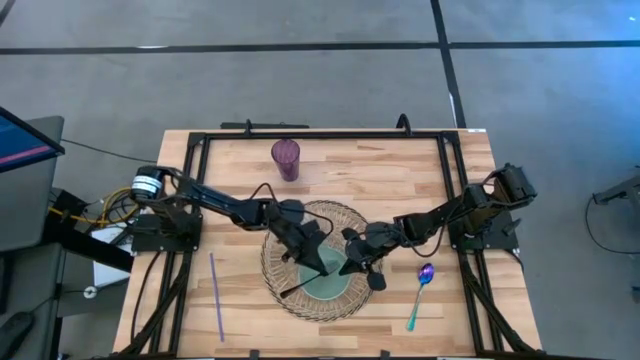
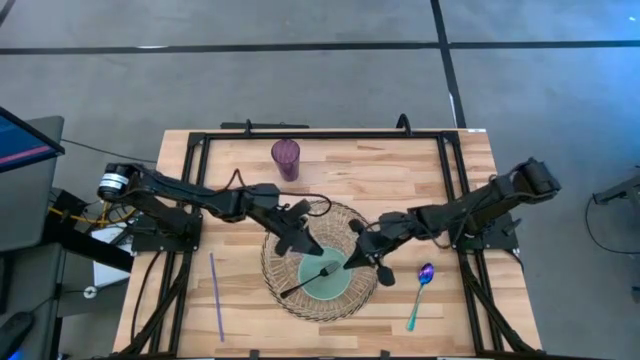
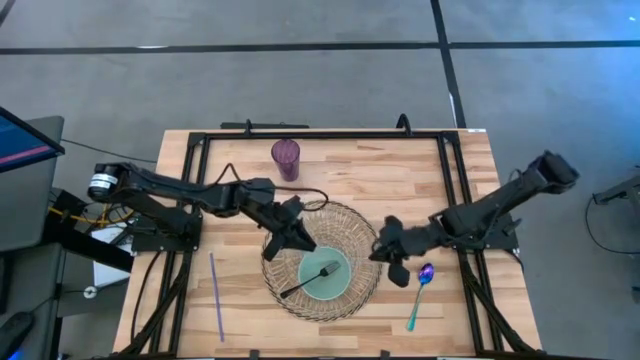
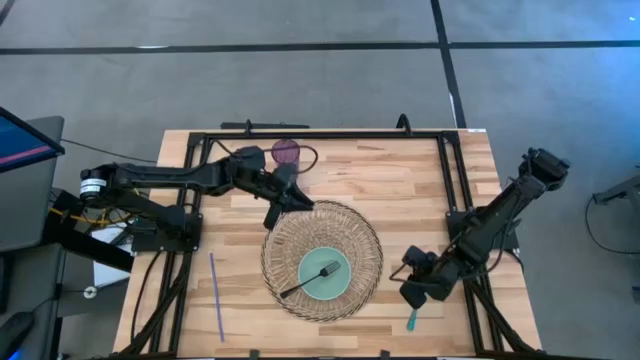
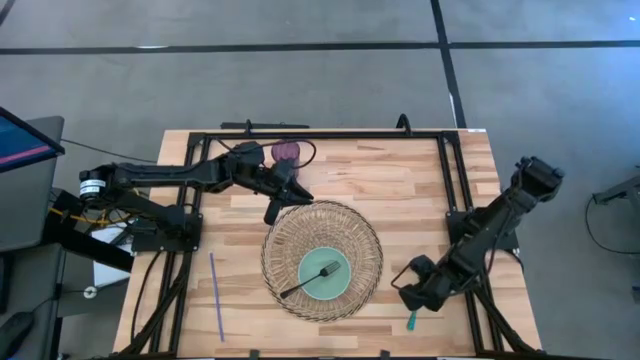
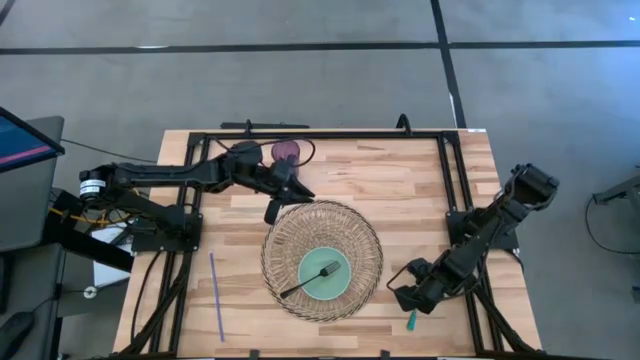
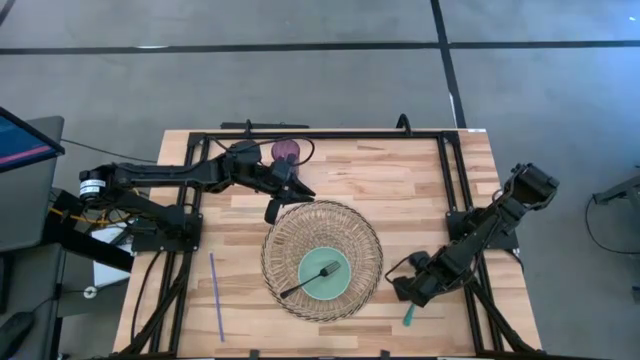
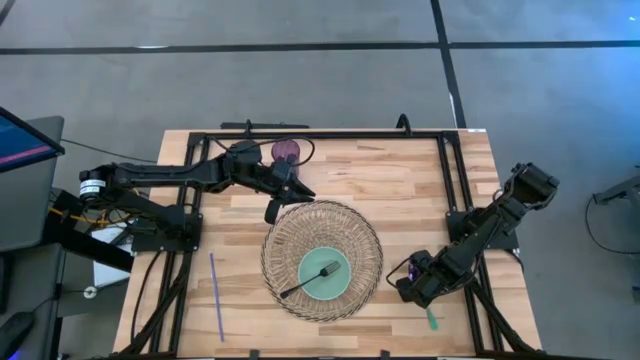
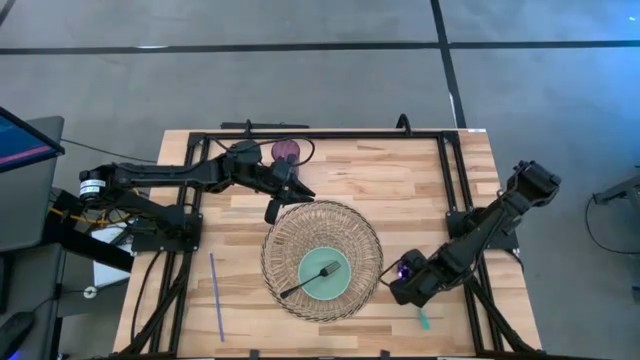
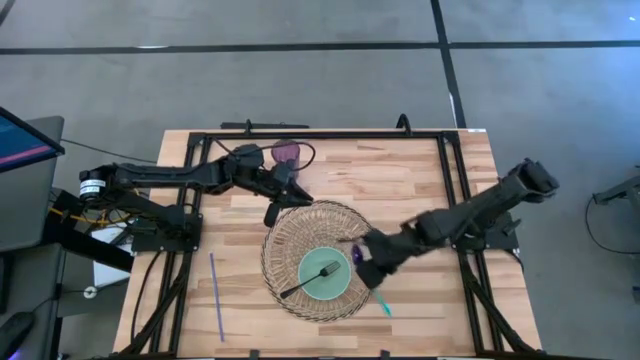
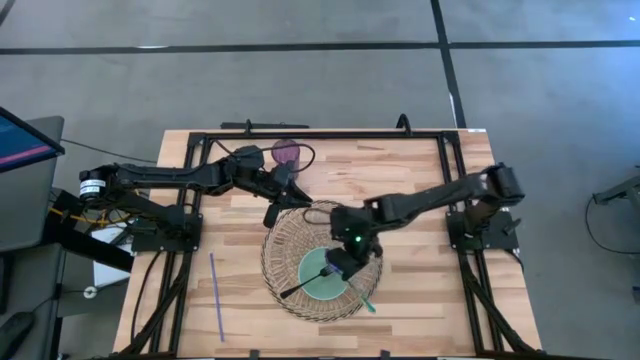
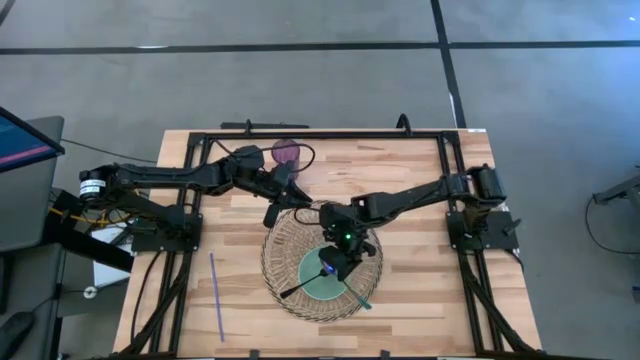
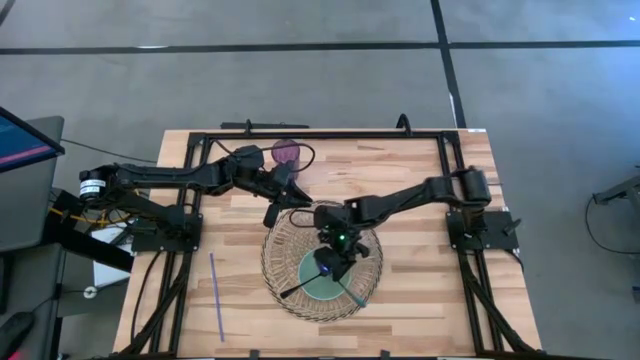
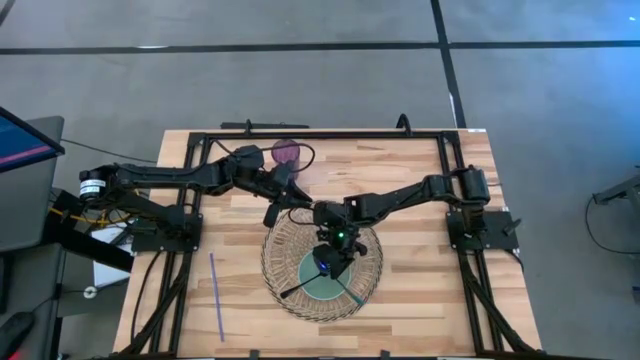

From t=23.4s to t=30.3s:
Task: Pick & Place Utensil
Put the purple spoon into the light green bowl on the woven mat

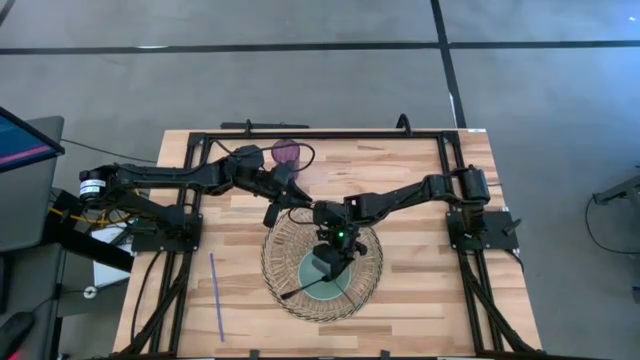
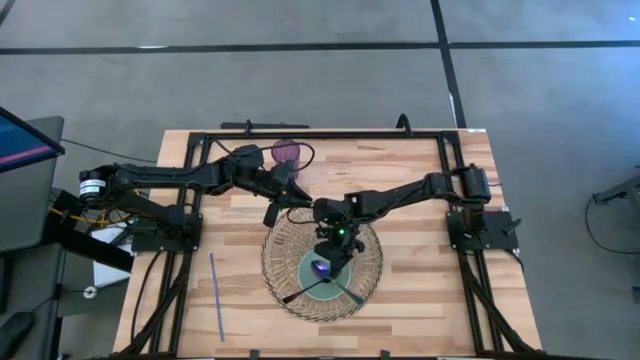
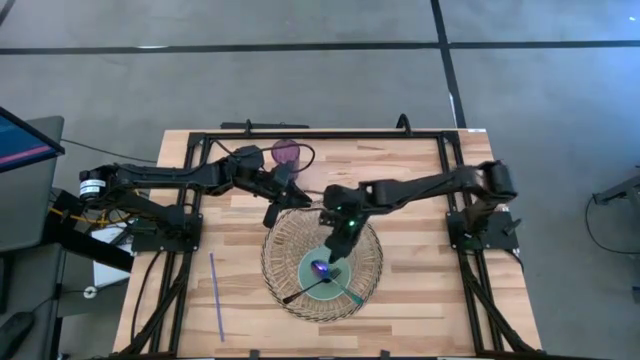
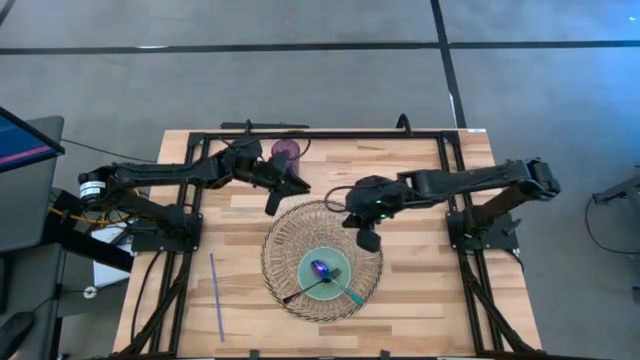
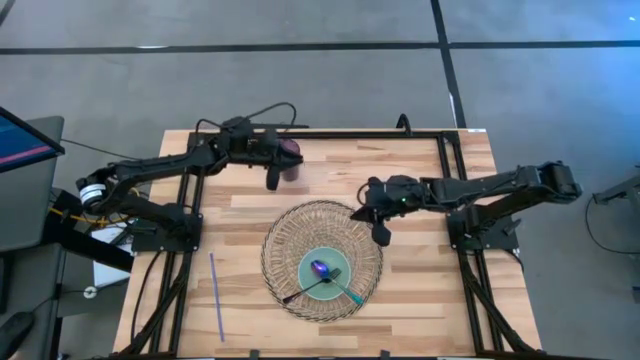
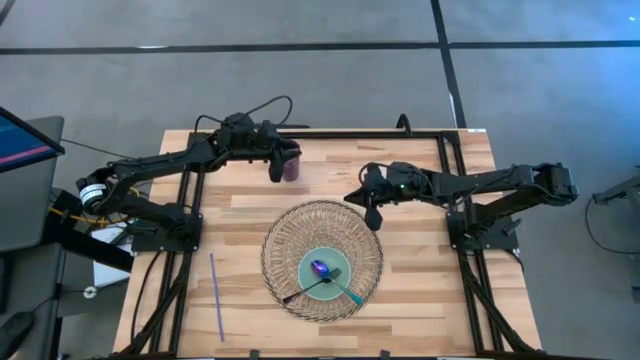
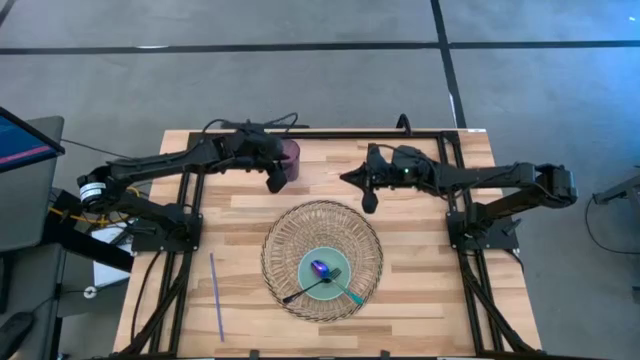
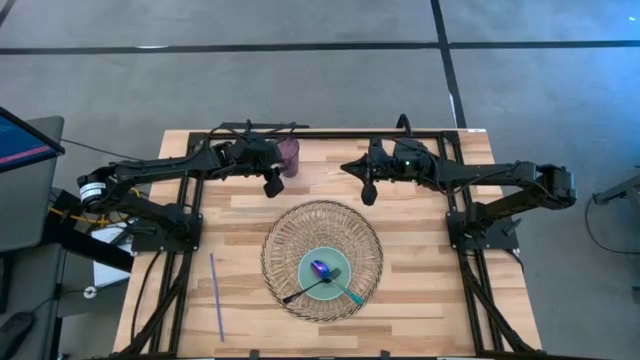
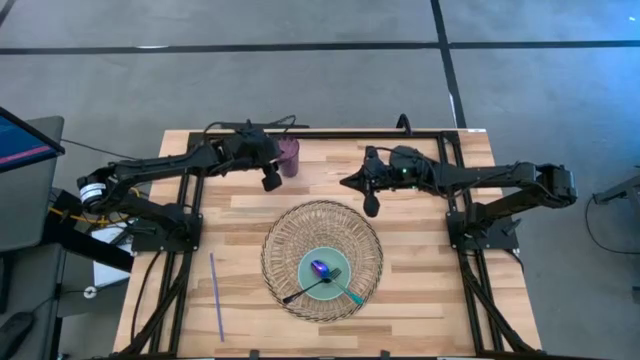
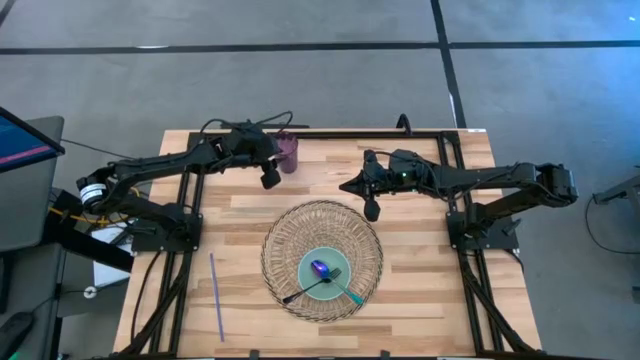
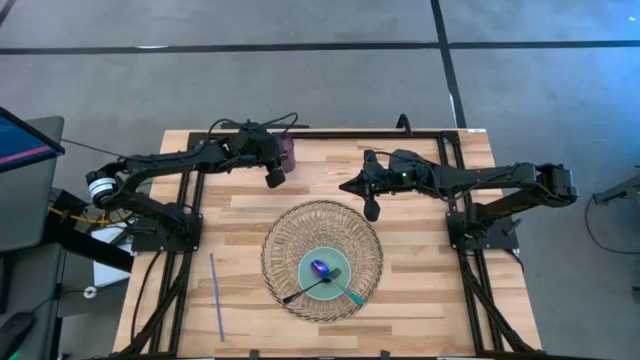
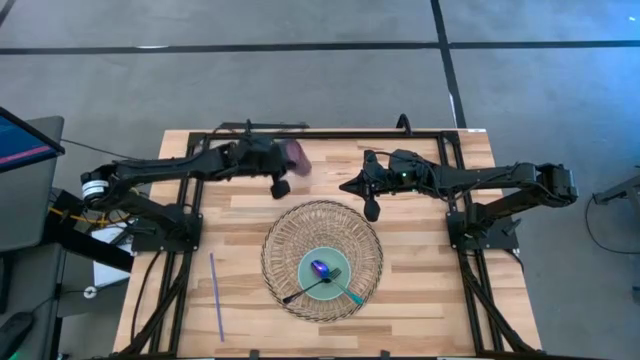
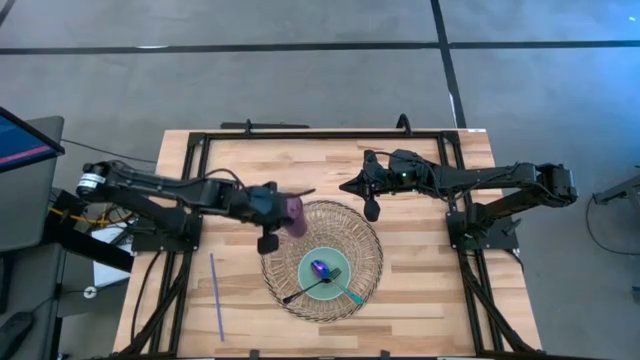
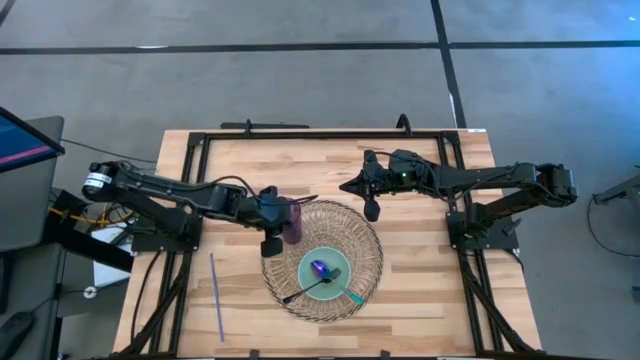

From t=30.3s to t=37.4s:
Put the violet glass on the woven mat to the top left of the light green bowl

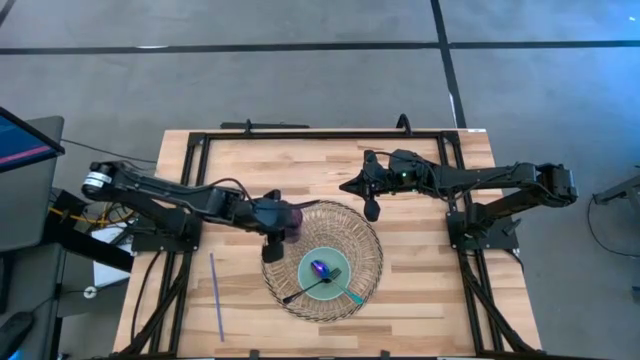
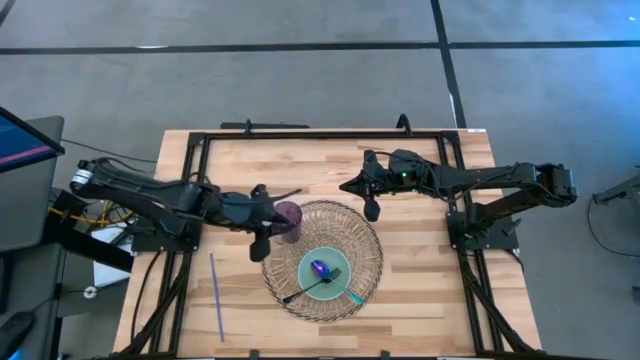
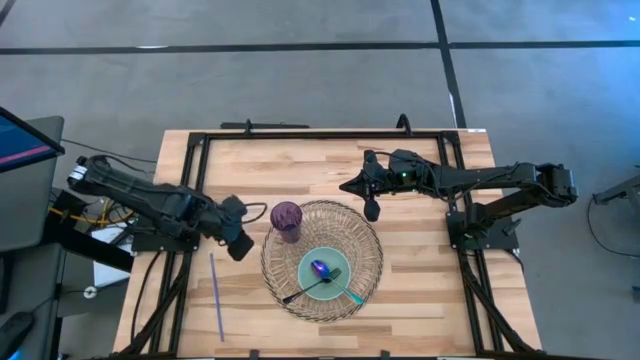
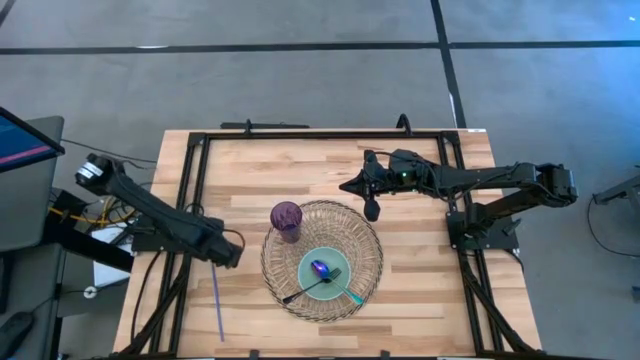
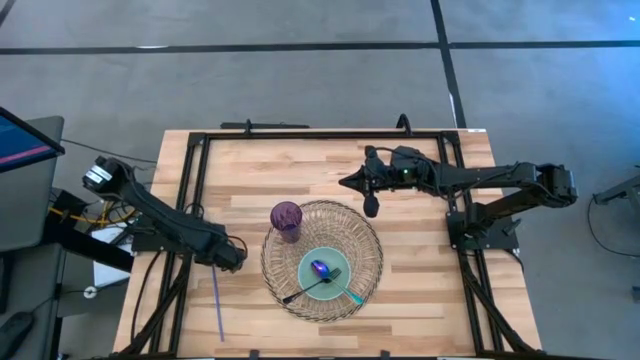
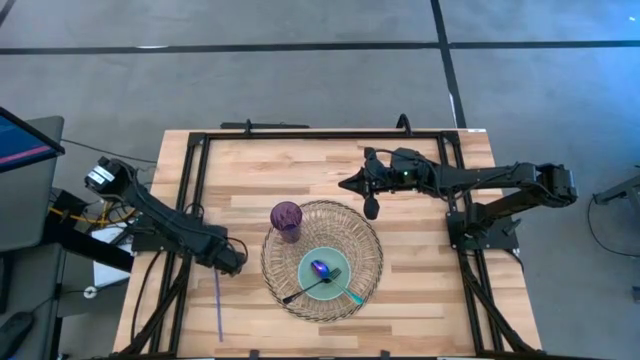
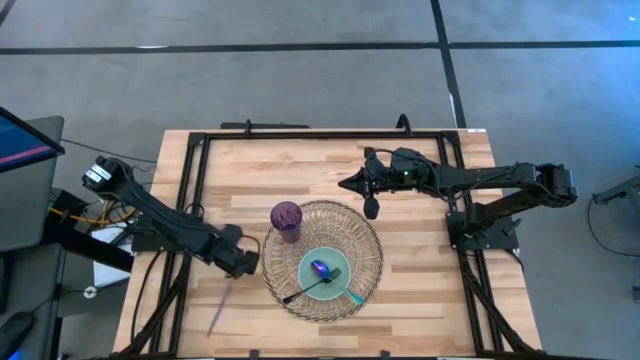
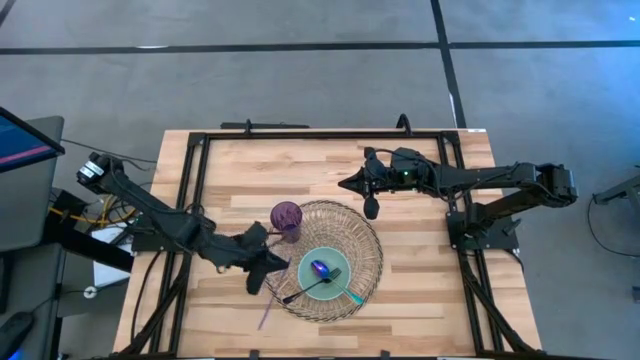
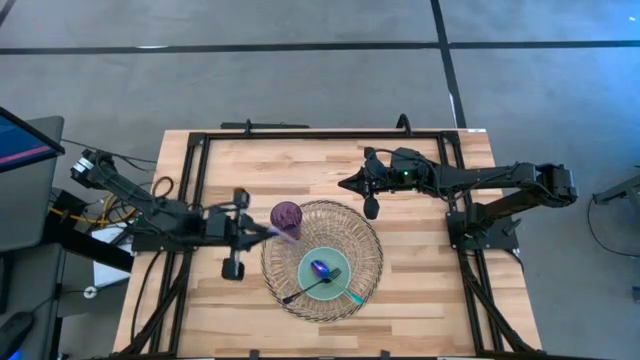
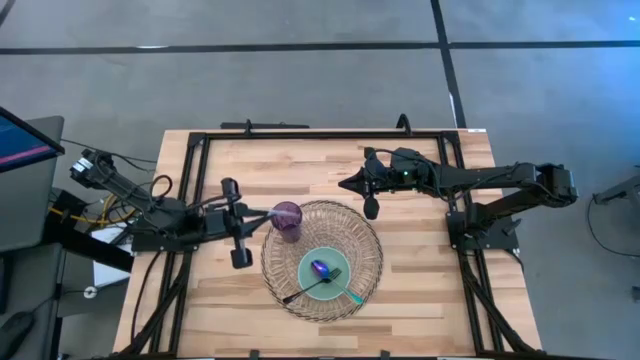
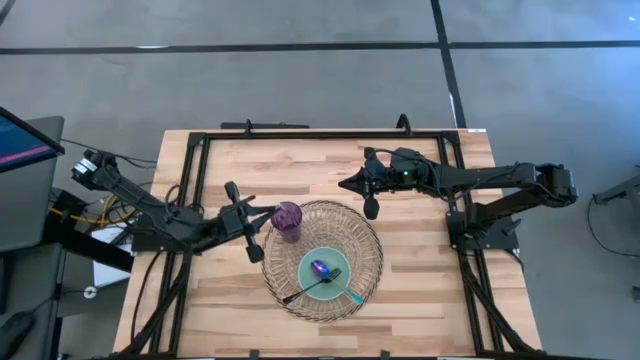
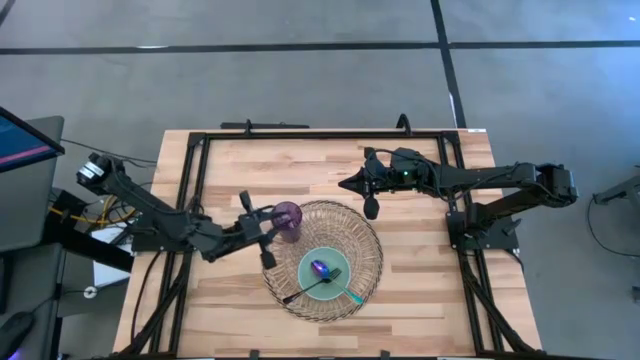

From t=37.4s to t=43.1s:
Put the violet straw into the violet glass on the woven mat

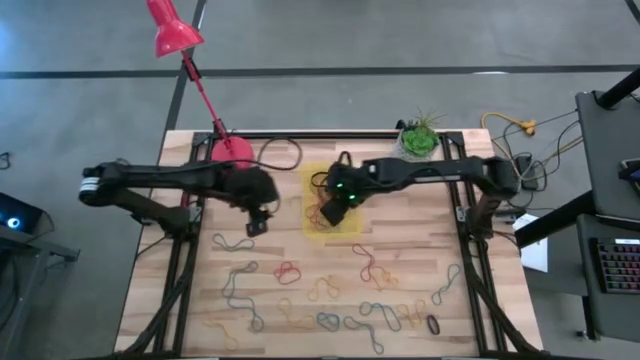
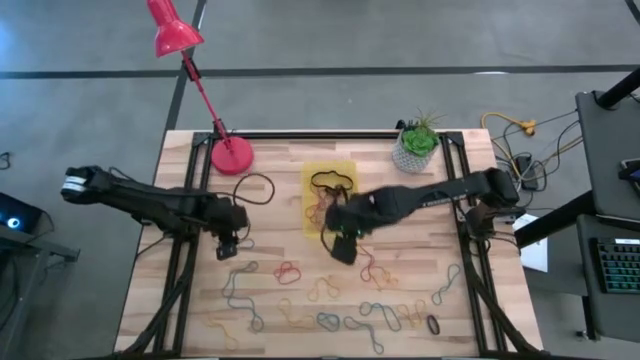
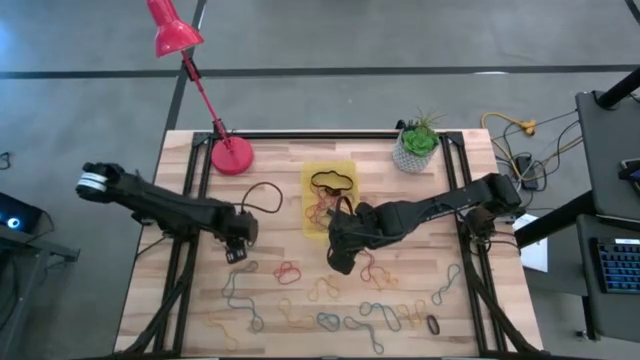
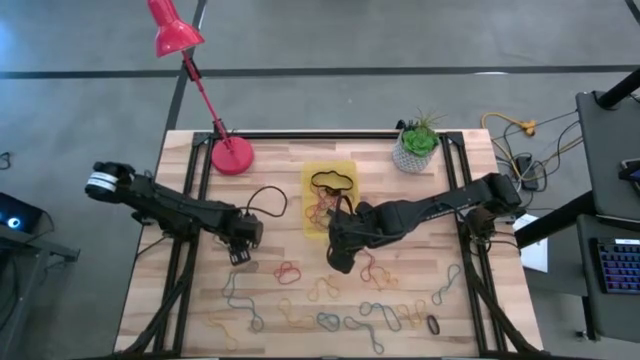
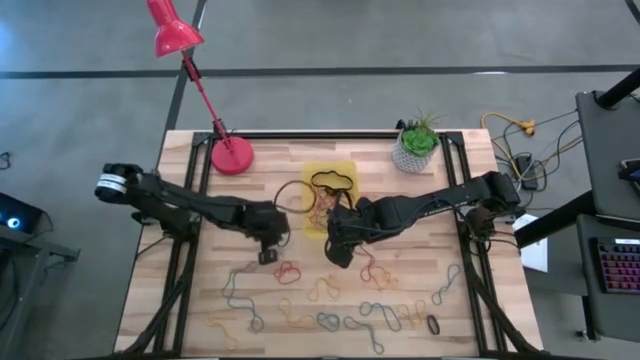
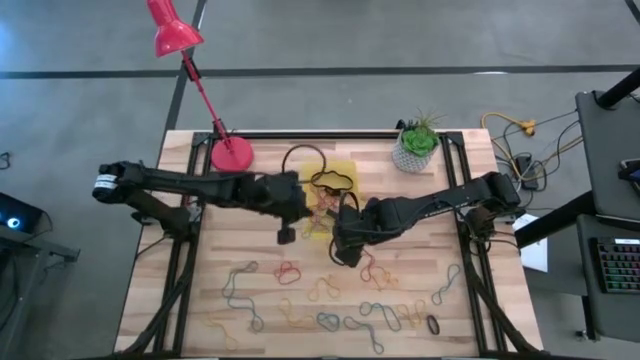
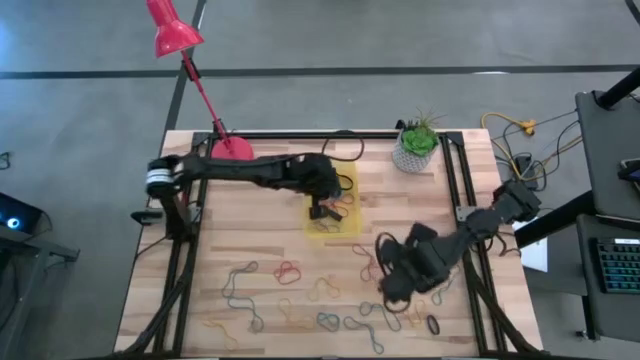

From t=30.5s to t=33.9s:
Task: Pick and place rubber bands into bin
Put the blue rubber band into the yellow bin
